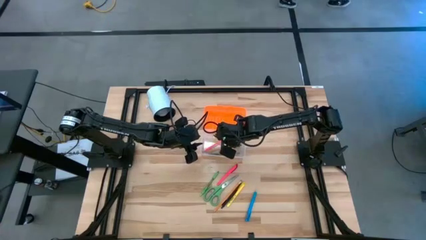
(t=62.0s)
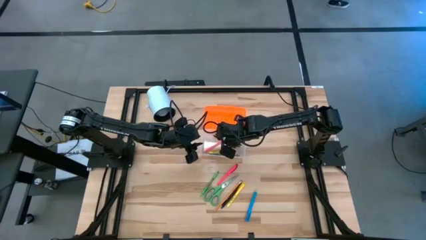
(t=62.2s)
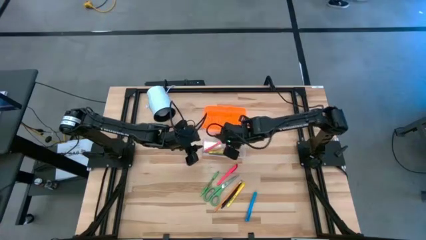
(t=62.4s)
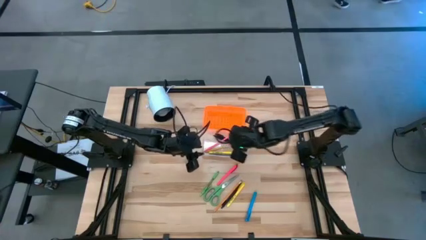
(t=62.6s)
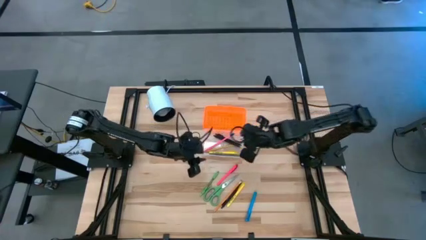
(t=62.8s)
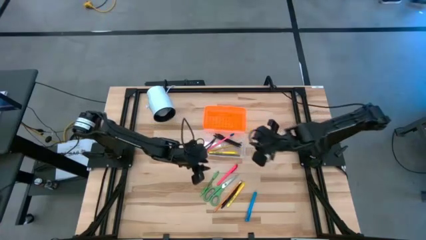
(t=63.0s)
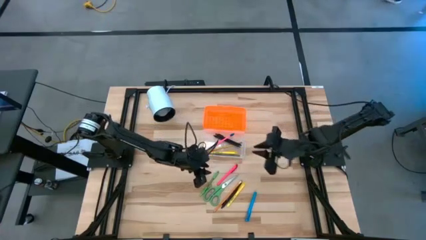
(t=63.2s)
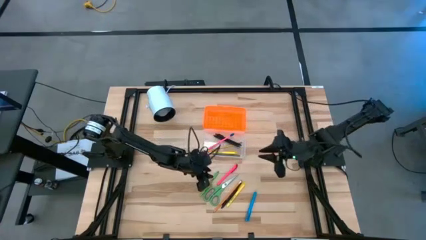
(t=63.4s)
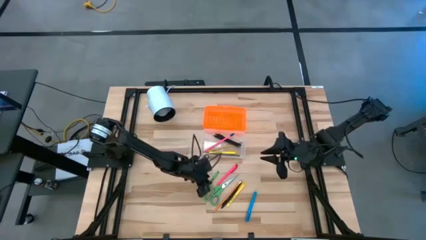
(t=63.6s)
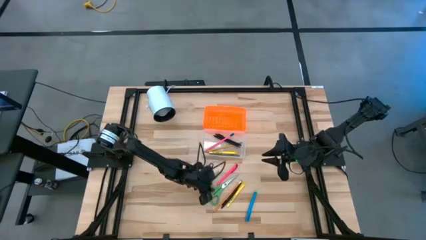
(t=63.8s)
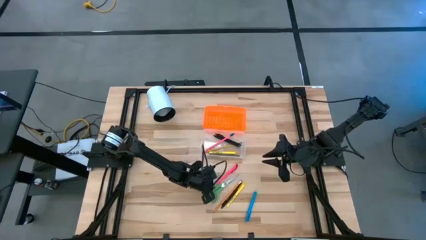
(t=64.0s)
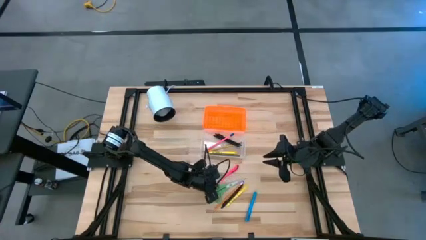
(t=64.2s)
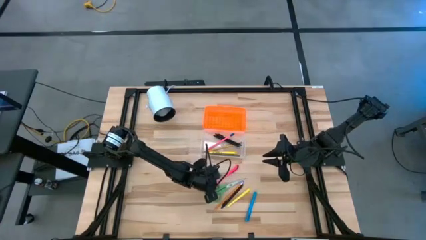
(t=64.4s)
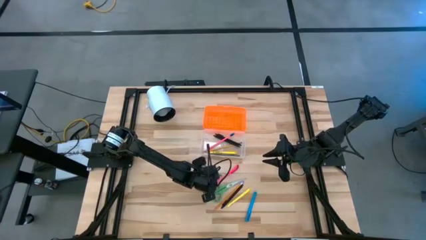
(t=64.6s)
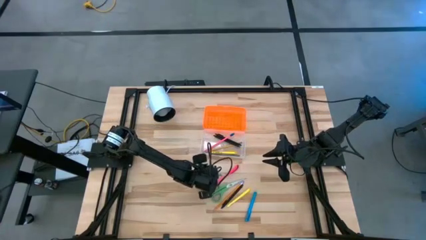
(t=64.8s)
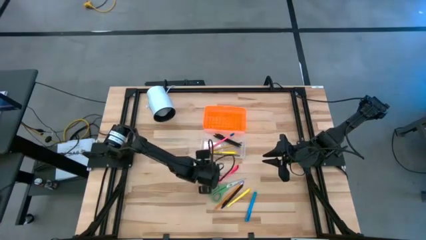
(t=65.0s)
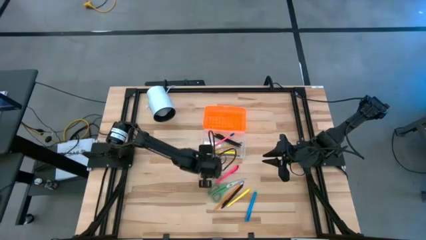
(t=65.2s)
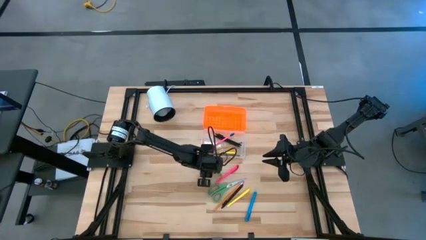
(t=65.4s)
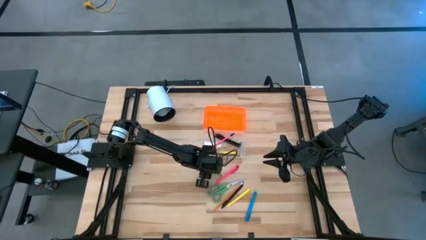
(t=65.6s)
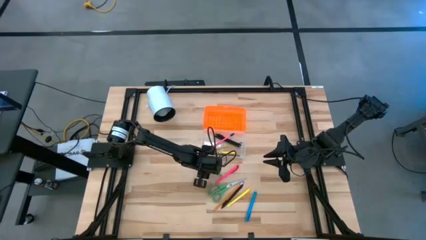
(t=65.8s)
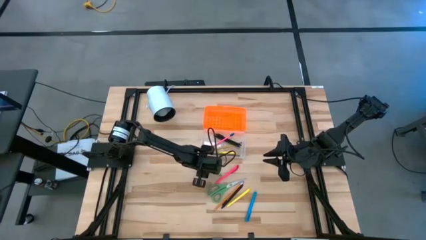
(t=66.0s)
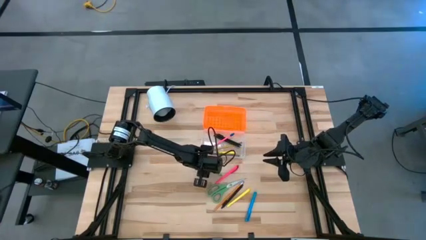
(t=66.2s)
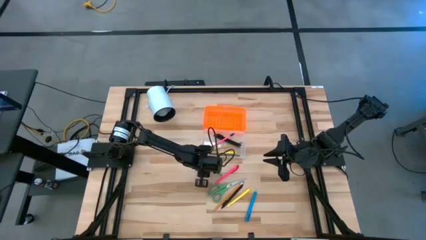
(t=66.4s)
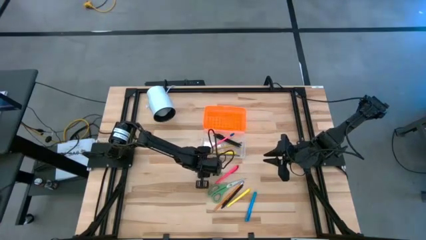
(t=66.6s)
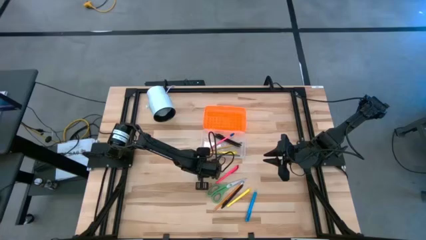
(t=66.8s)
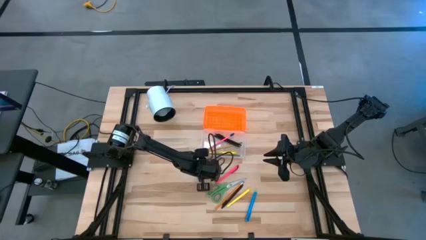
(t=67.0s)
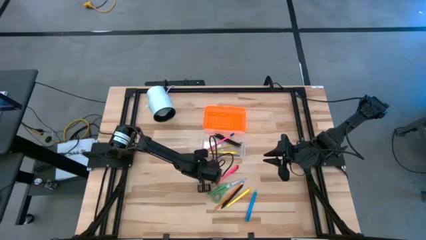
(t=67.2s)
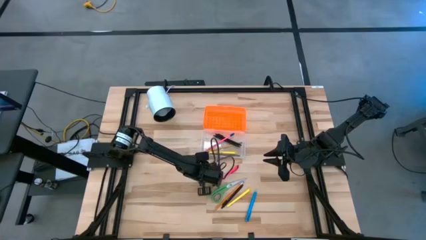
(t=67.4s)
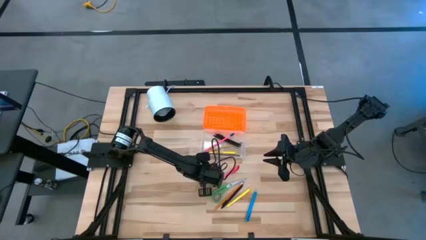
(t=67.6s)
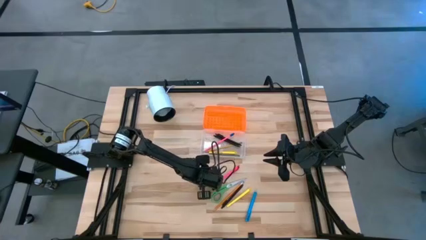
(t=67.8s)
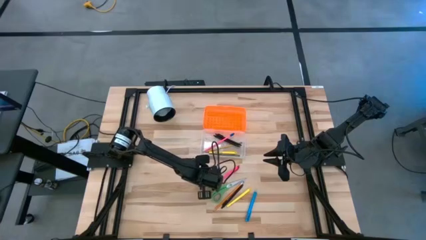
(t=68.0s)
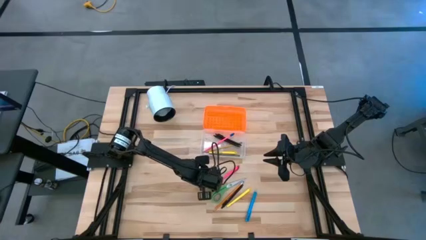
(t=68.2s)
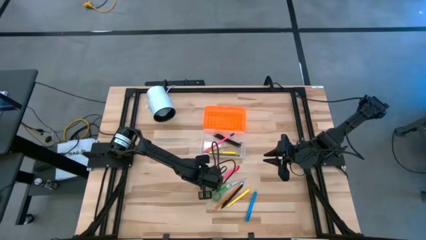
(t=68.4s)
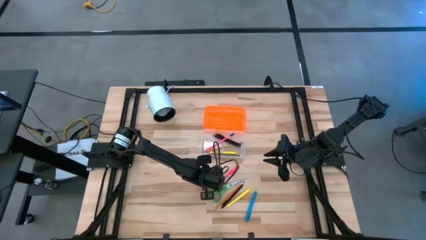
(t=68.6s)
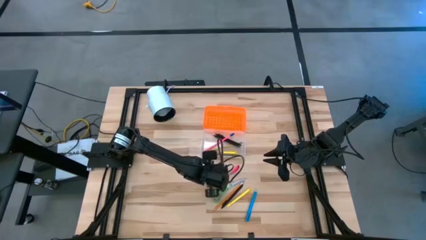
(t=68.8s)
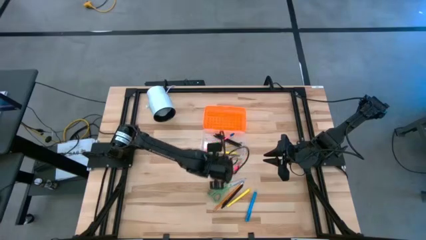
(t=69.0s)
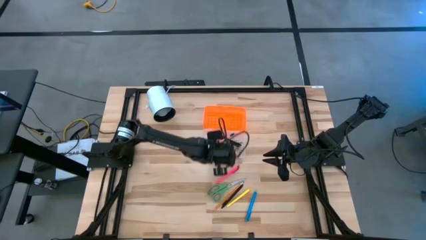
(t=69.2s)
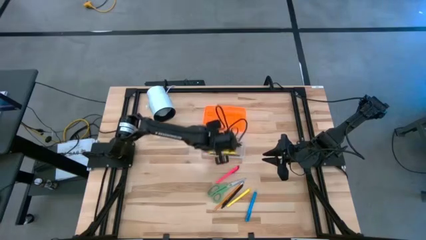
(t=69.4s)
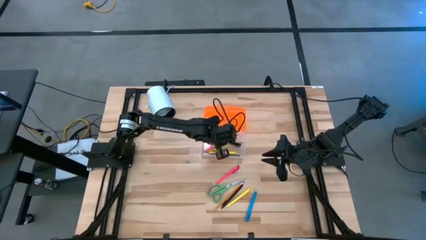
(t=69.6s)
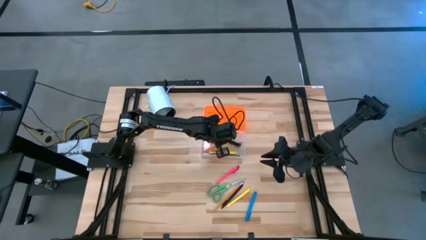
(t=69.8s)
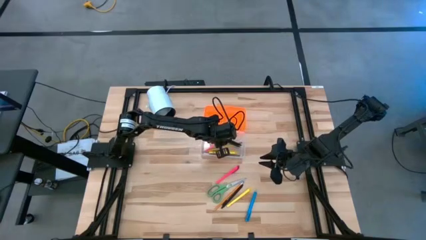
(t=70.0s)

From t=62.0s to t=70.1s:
Task: Pick & place school supplies into a supply box
Put the green pen into the orange supply box

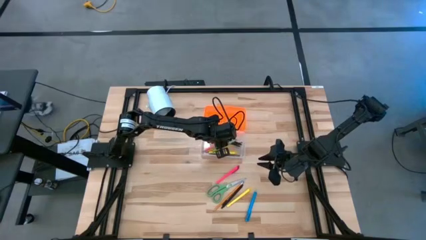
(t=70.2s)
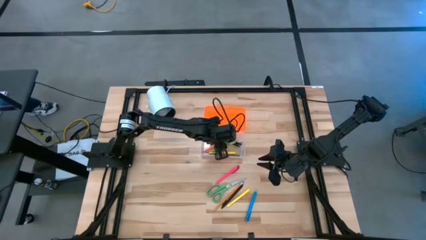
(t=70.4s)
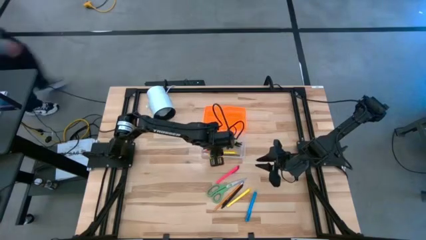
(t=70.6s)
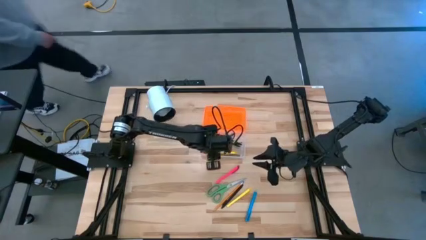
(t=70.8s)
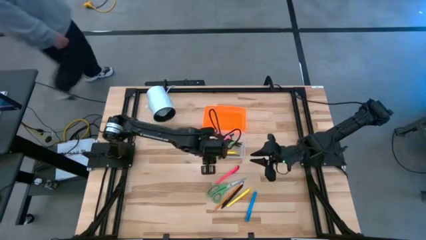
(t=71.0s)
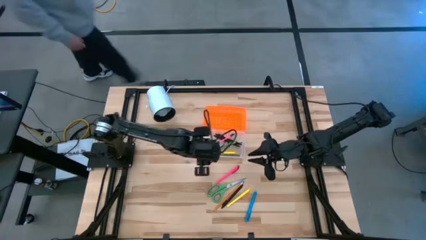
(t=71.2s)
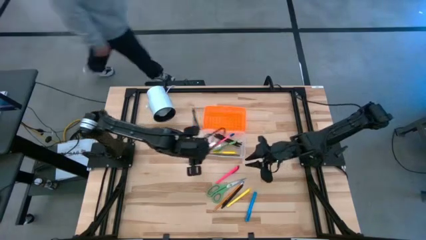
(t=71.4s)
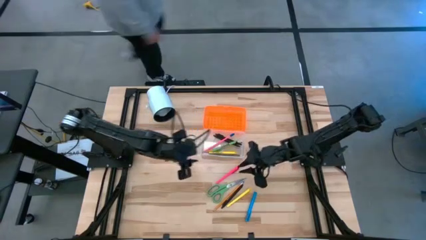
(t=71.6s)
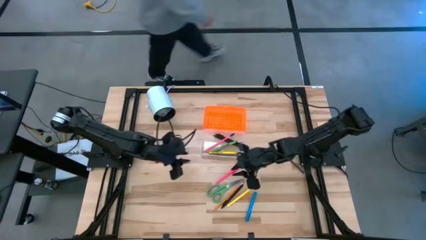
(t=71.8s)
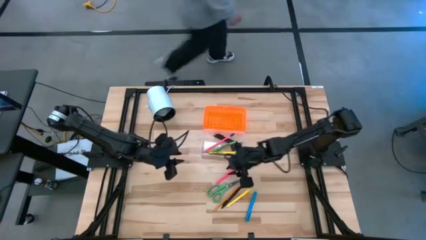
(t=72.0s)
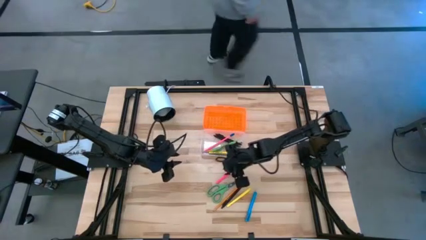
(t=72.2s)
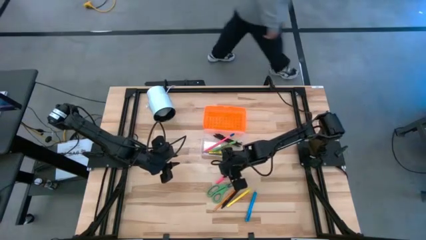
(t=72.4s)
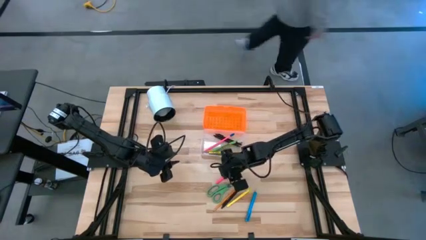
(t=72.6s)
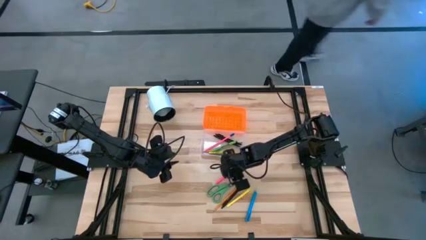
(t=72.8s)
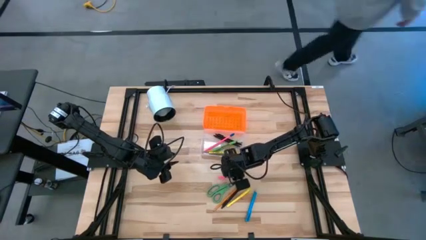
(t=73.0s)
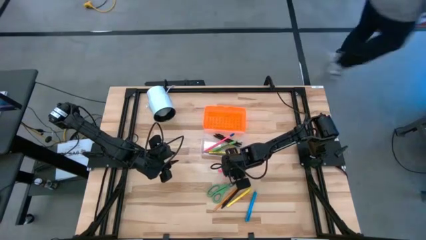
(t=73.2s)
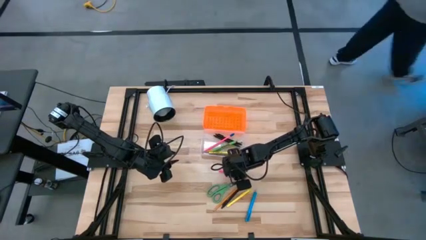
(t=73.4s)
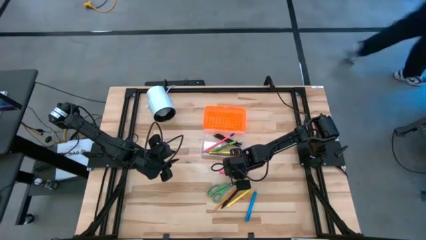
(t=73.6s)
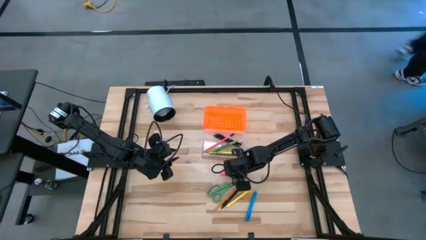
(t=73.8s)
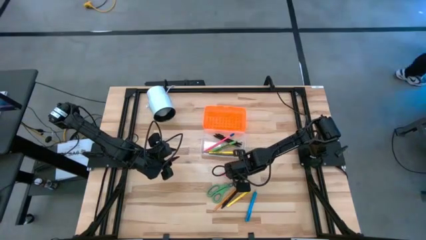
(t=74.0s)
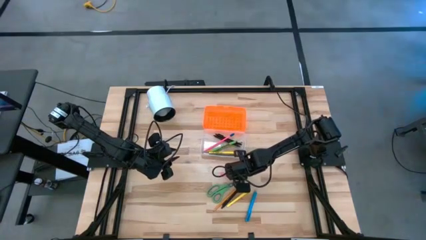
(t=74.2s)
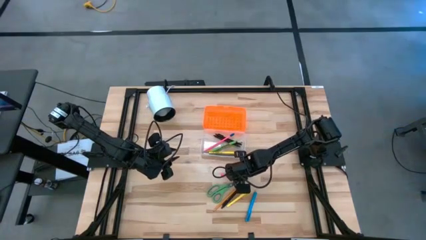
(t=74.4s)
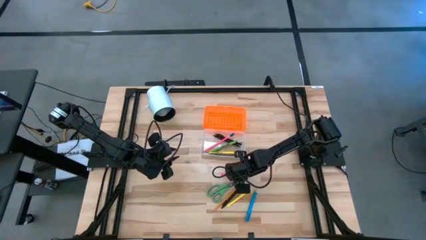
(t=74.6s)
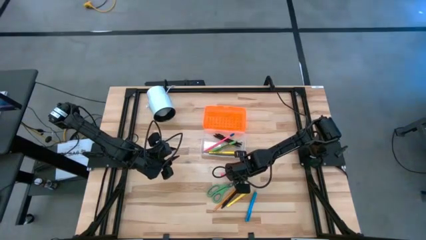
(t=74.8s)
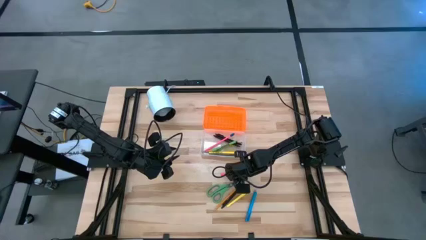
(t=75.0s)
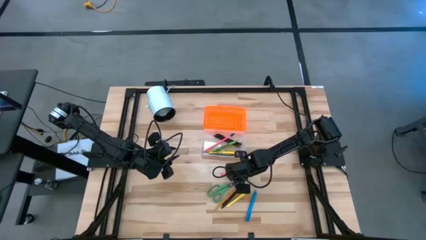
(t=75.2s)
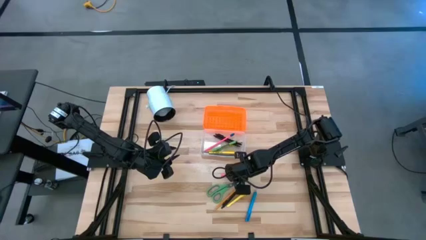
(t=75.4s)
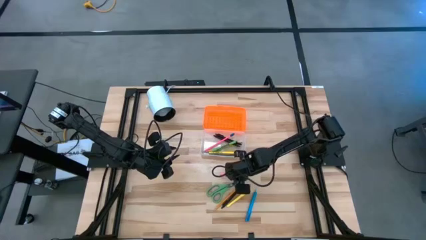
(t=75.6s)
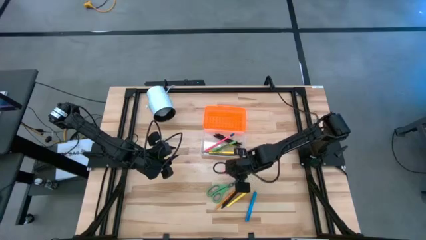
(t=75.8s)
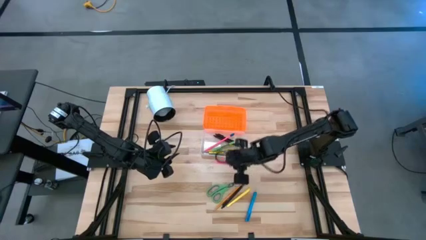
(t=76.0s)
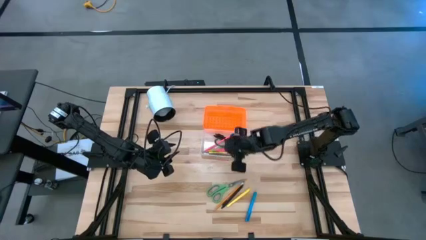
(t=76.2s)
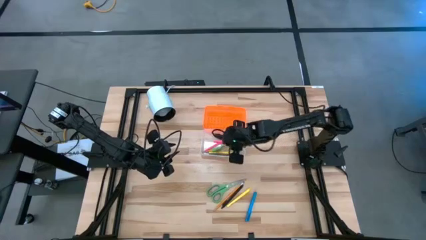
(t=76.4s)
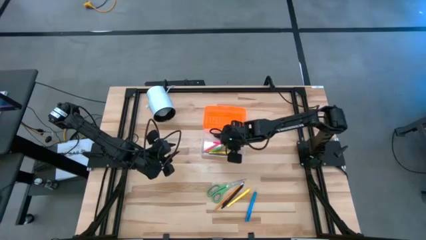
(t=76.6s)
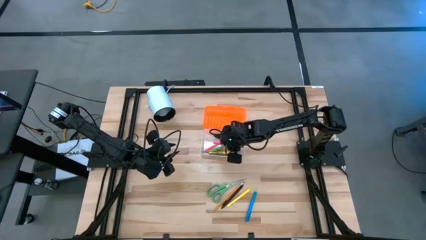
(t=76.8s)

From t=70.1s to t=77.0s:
Put the pink pen into the orange supply box
